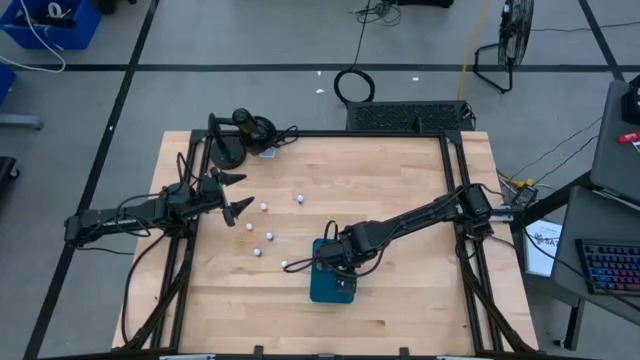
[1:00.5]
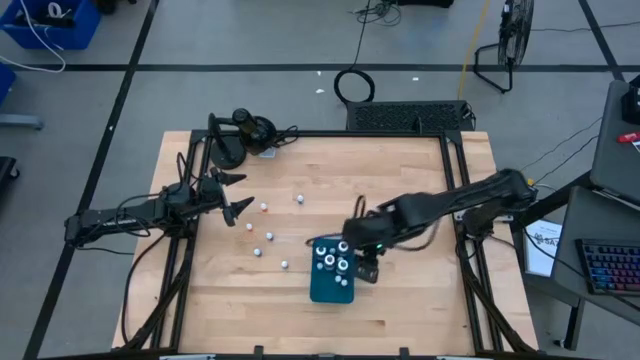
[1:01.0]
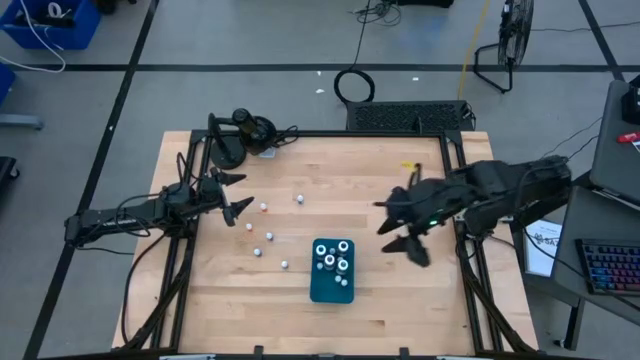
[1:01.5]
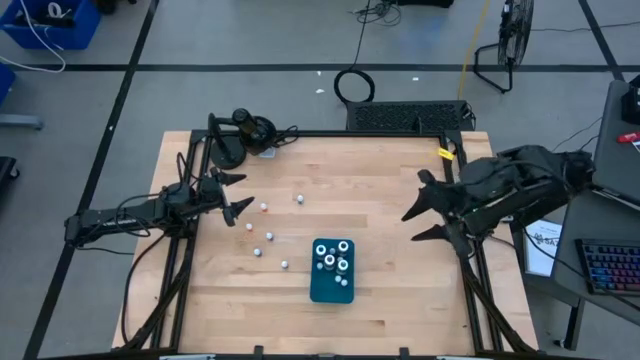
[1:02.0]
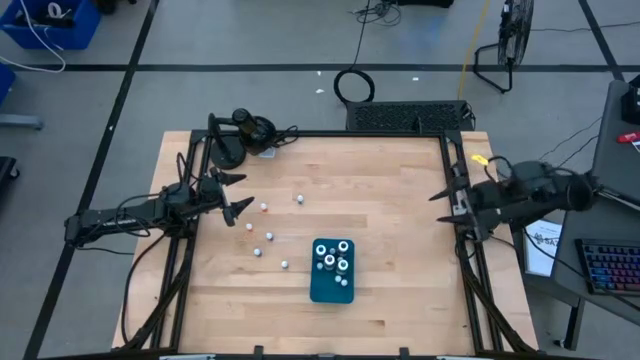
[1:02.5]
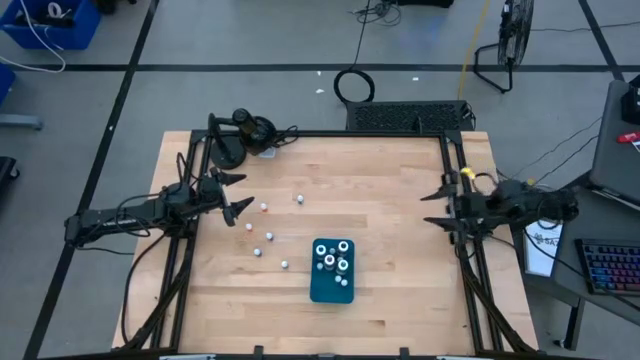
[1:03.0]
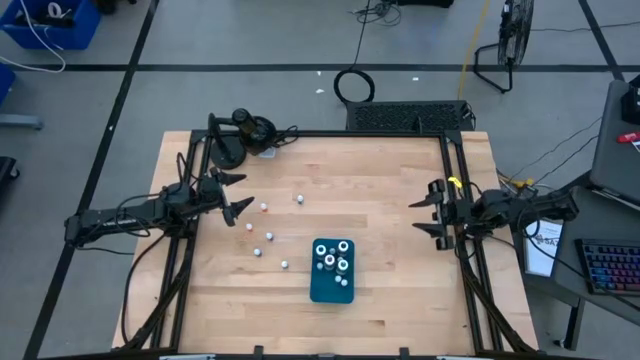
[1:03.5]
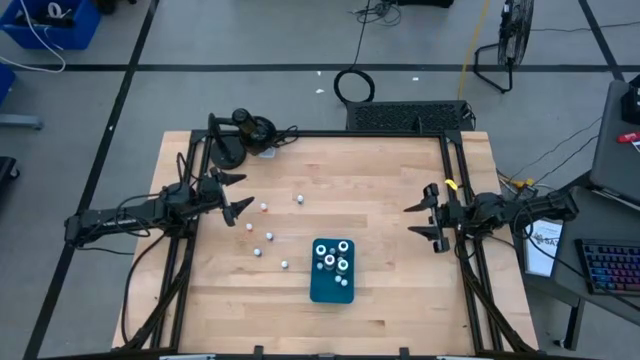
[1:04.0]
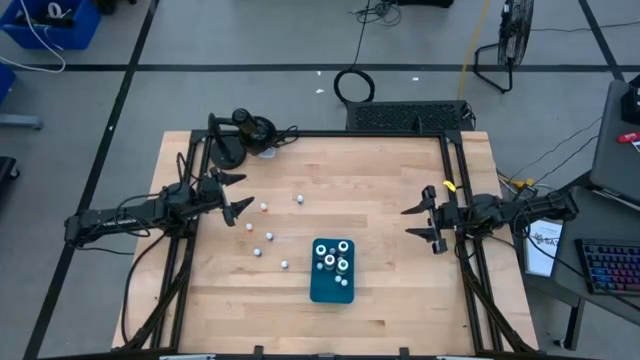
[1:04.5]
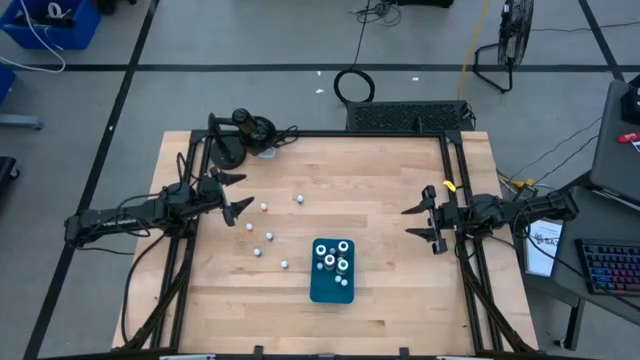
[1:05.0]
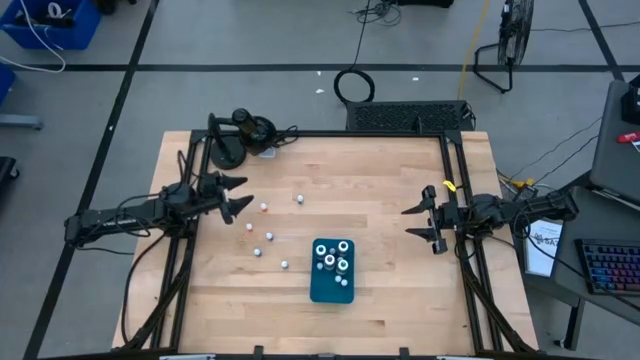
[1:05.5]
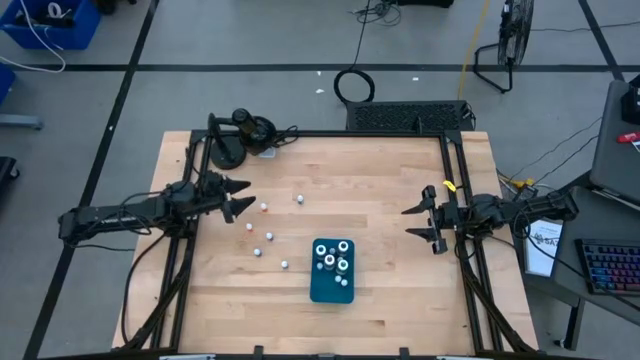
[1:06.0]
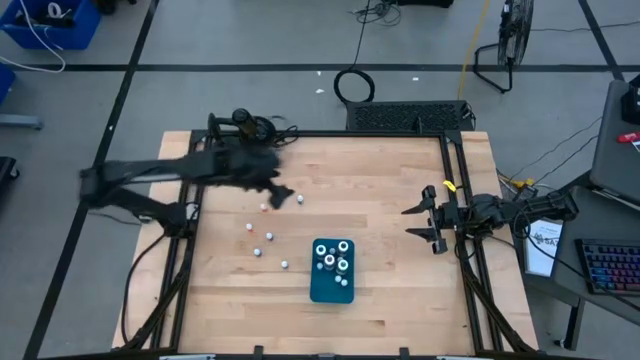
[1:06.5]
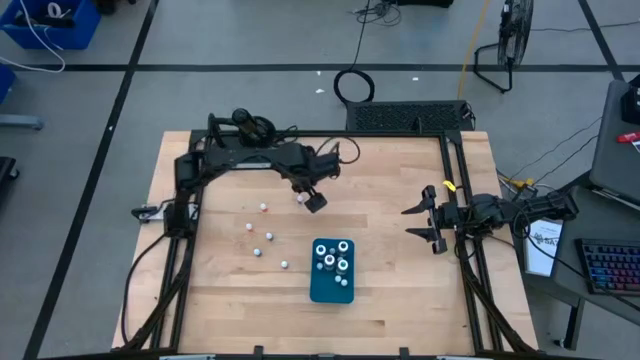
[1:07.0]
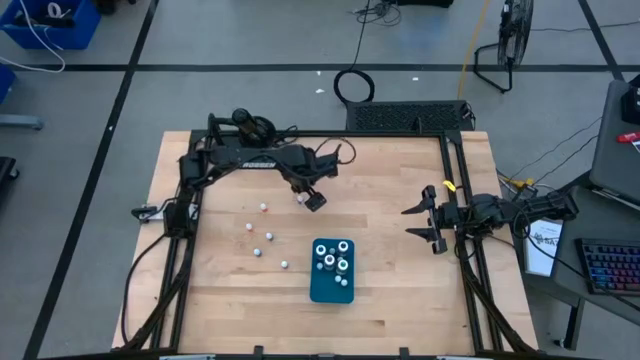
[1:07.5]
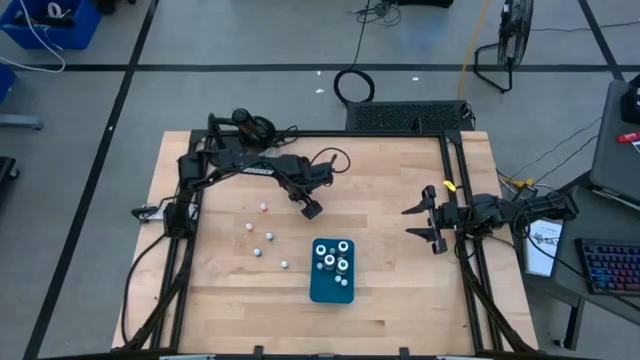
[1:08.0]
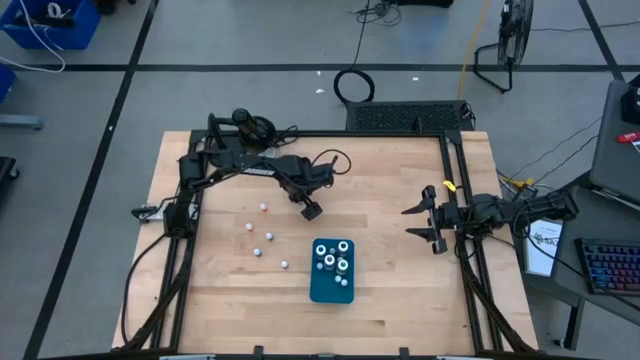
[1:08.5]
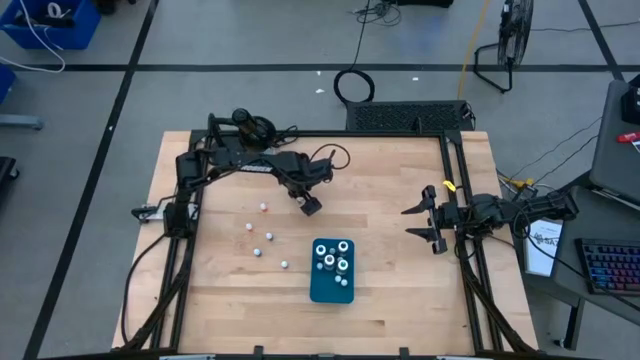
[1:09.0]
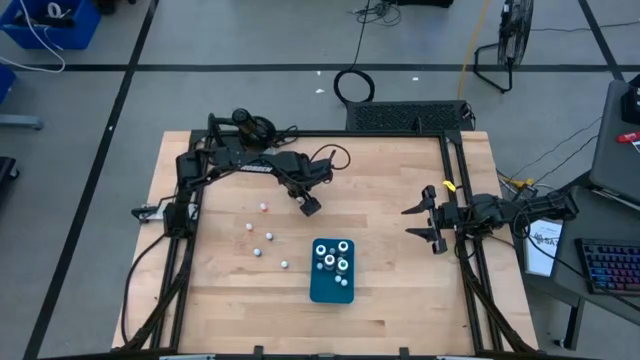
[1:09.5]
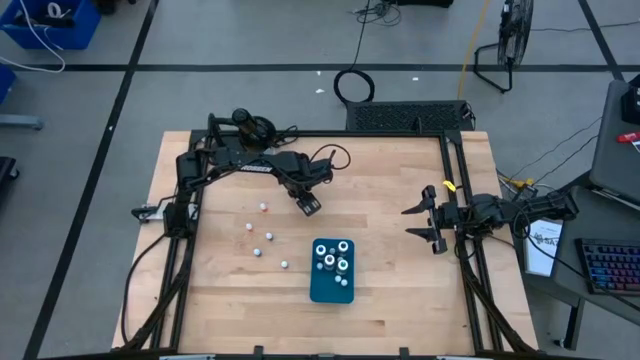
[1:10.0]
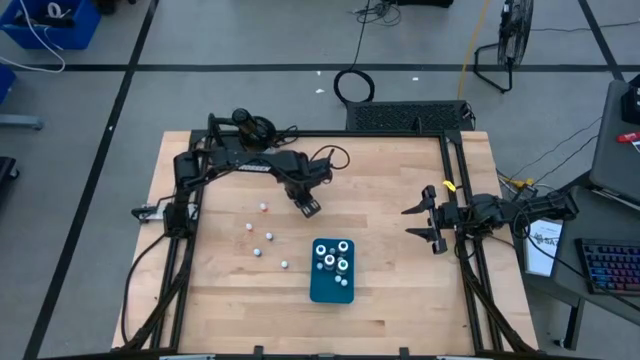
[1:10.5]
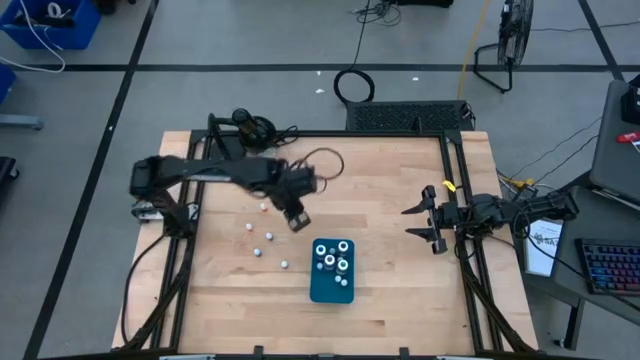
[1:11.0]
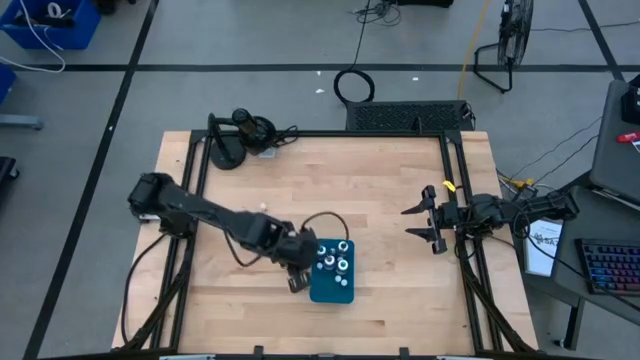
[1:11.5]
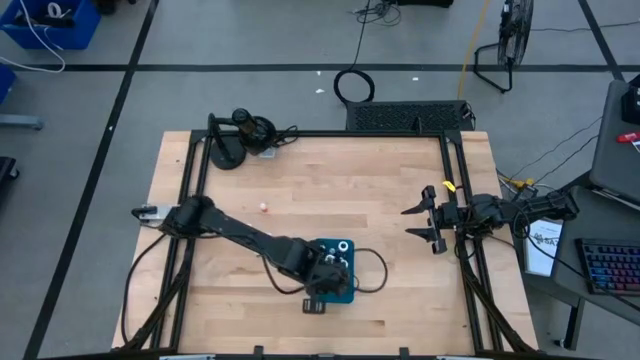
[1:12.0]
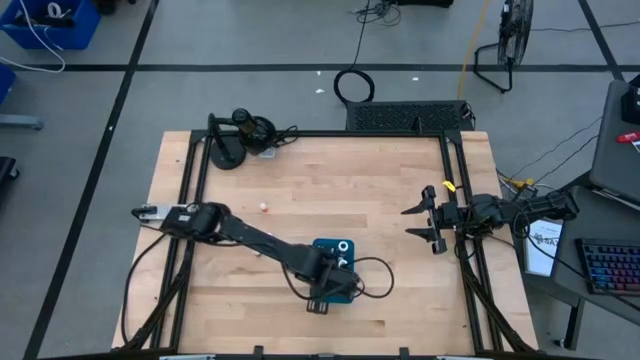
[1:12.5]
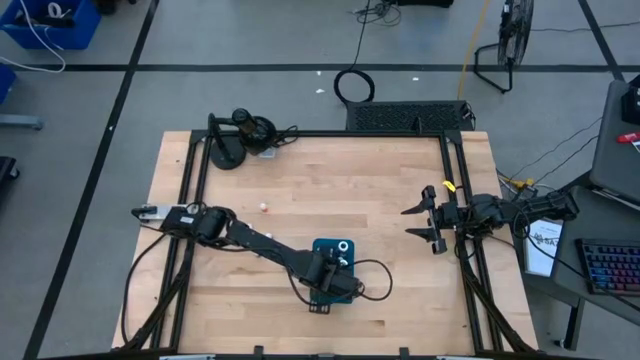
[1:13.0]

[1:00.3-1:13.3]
Task: Pick & Place food coloring
Put the purple small food coloring bottle into the blue bin

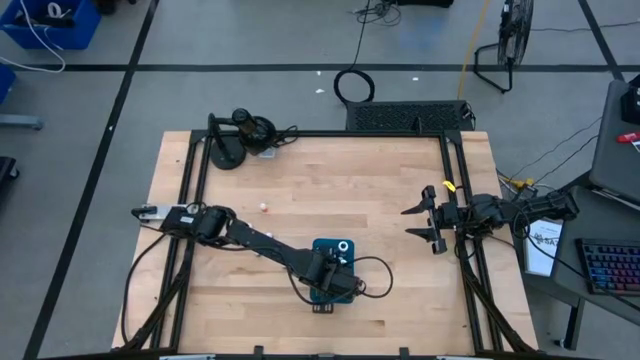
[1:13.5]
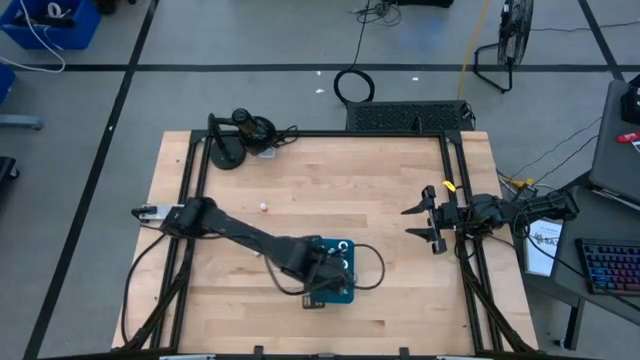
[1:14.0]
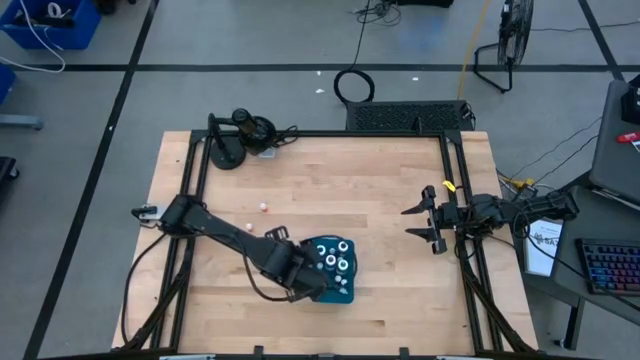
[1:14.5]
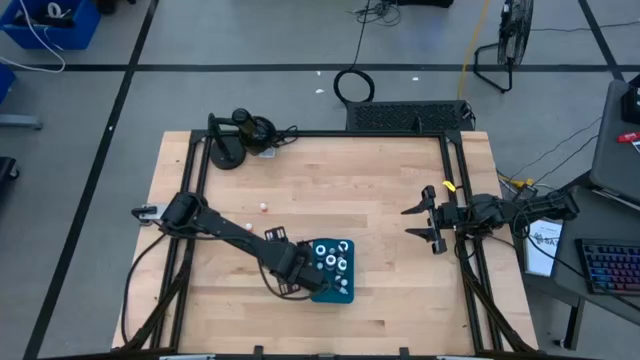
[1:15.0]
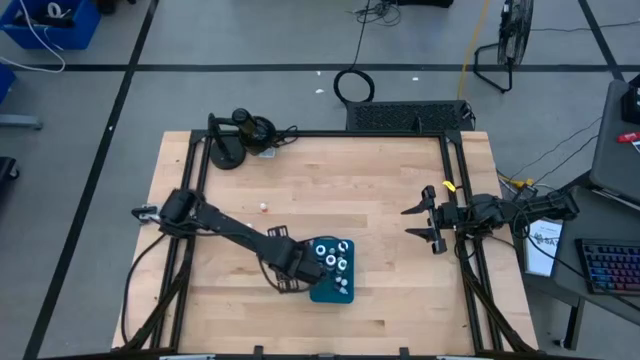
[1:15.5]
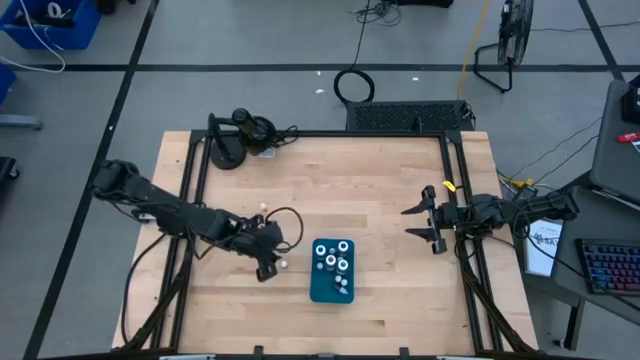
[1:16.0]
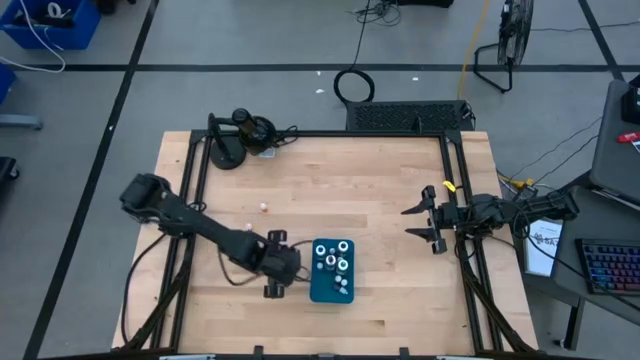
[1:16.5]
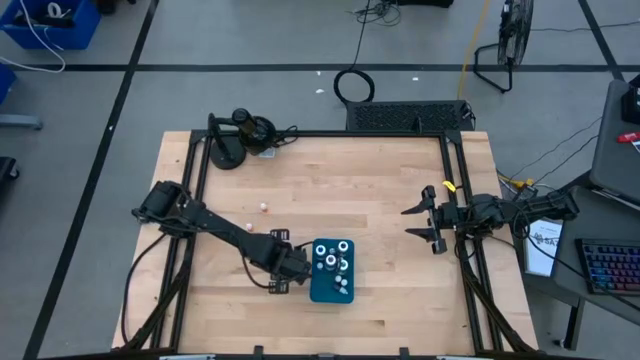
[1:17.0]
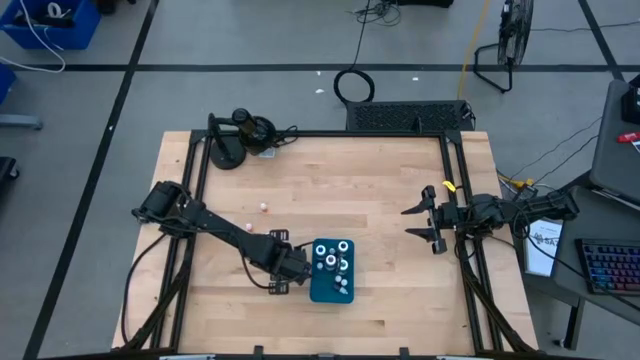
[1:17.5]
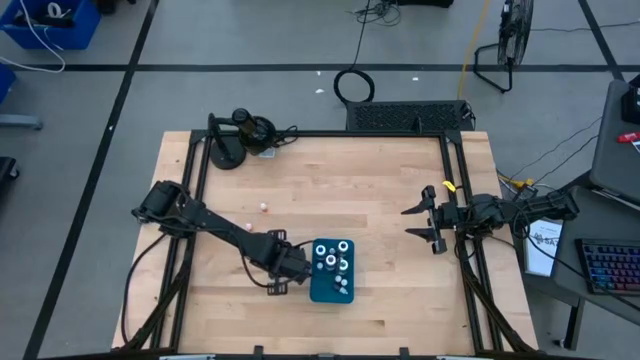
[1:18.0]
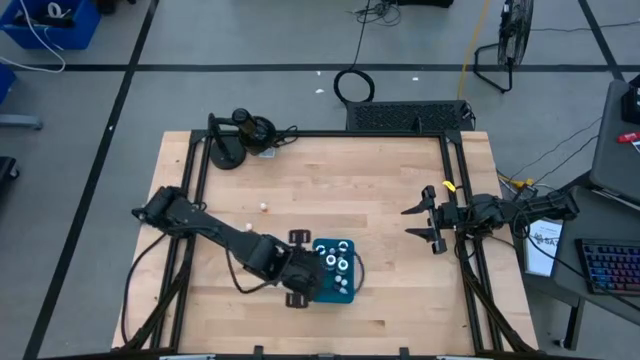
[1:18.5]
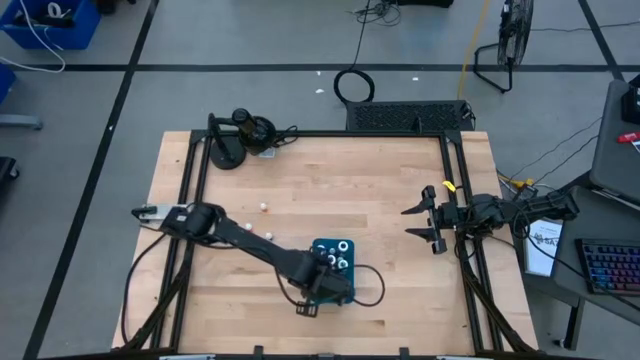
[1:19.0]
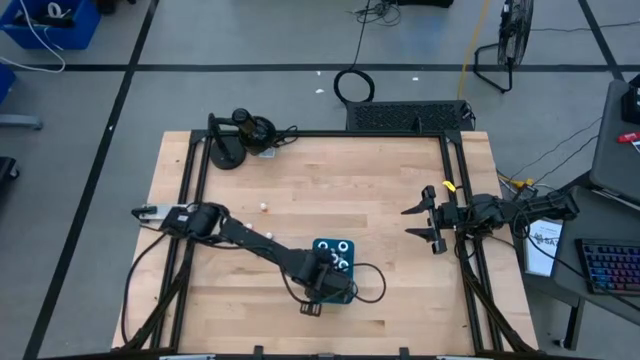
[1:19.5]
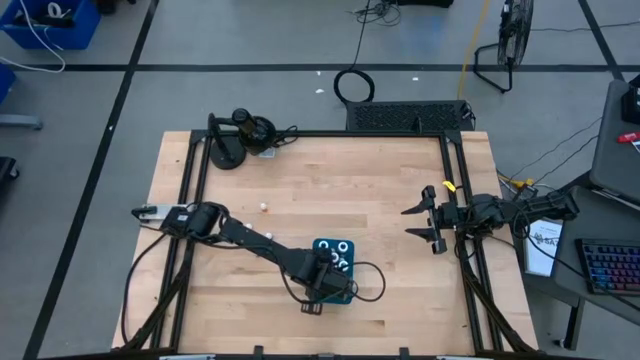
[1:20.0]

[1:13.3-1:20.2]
Put the red small food coloring bottle into the blue bin

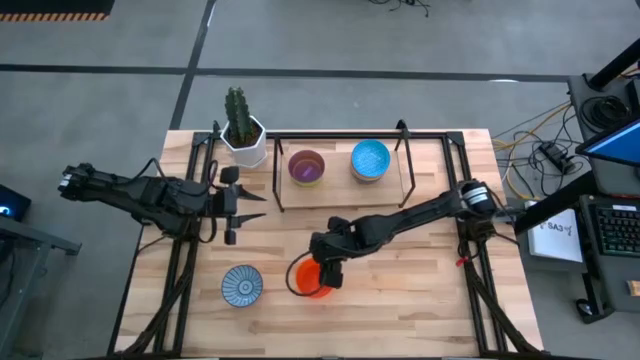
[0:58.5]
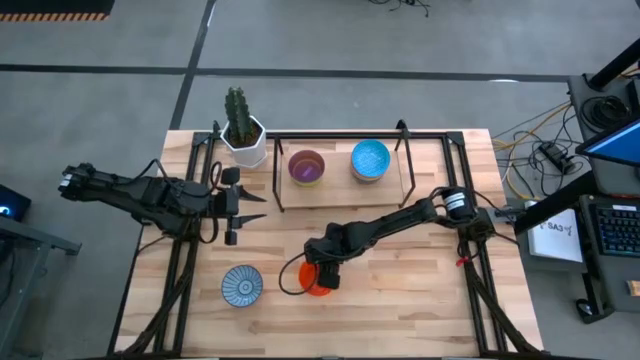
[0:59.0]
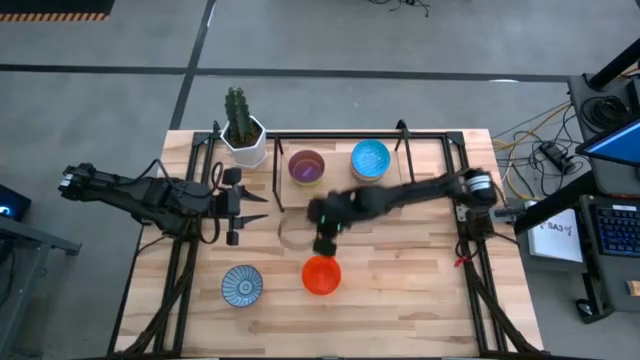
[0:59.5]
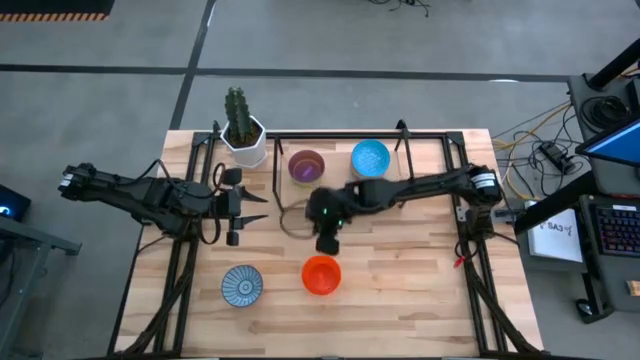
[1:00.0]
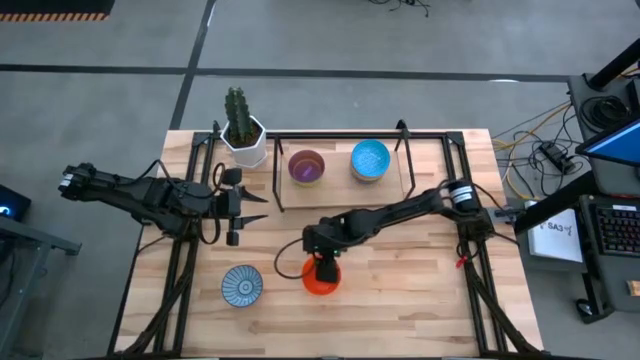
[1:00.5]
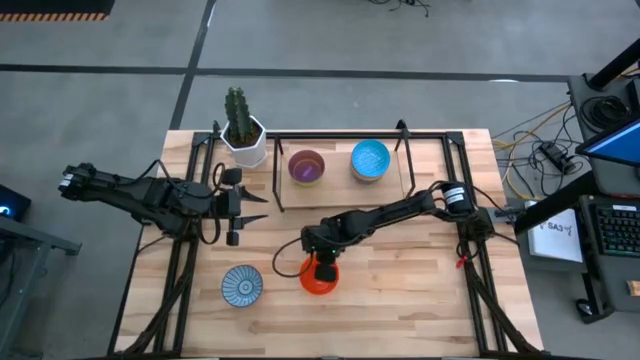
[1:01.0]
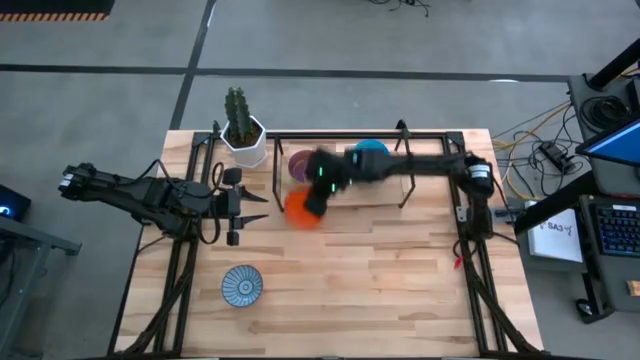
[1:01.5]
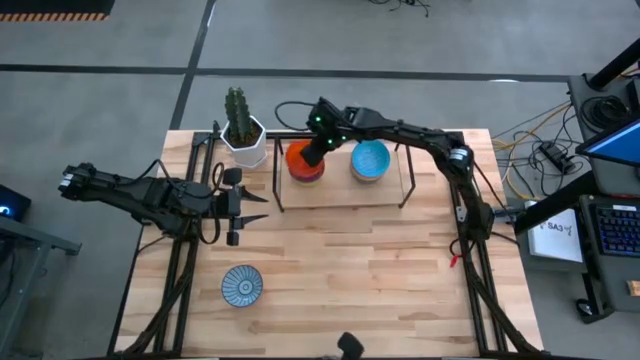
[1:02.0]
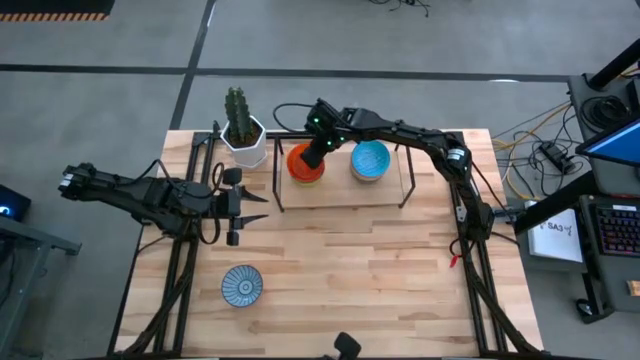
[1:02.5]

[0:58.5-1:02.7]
Task: Place and stack bowls onto a shelf
Stack the orange bowl on the purple bowl
